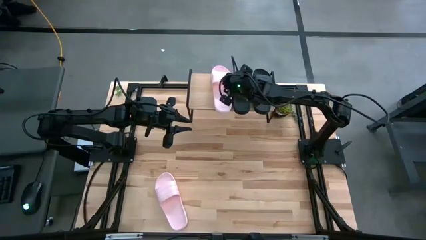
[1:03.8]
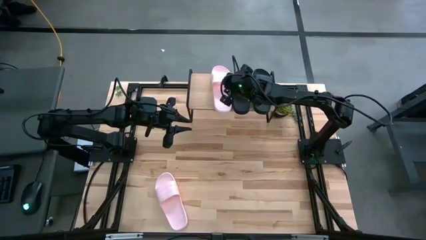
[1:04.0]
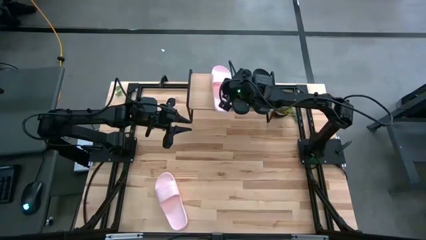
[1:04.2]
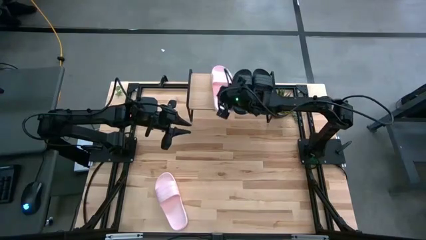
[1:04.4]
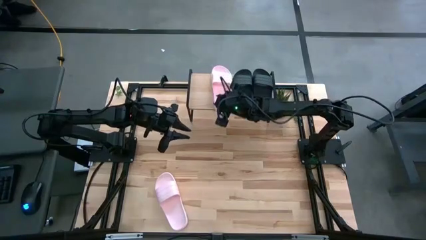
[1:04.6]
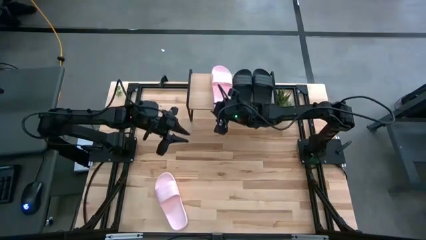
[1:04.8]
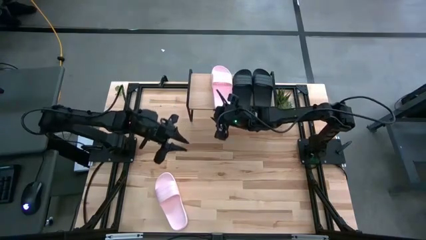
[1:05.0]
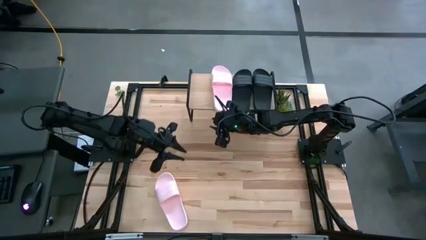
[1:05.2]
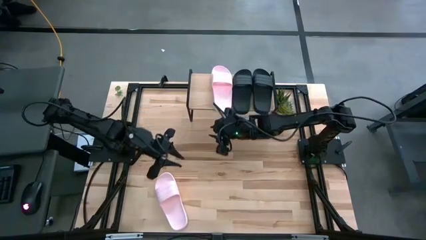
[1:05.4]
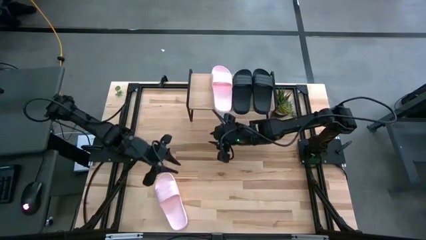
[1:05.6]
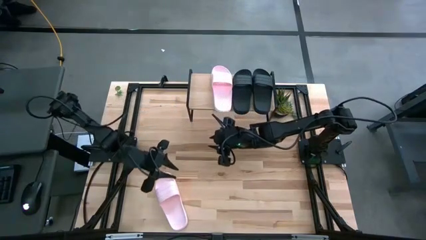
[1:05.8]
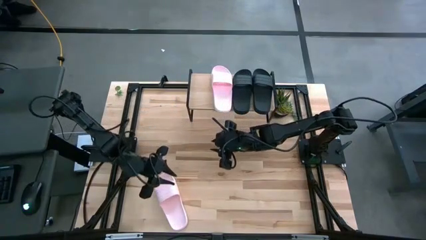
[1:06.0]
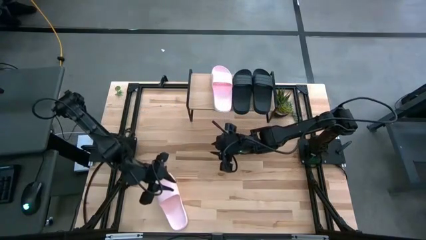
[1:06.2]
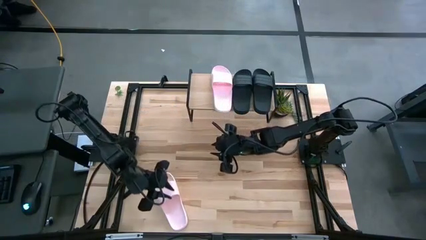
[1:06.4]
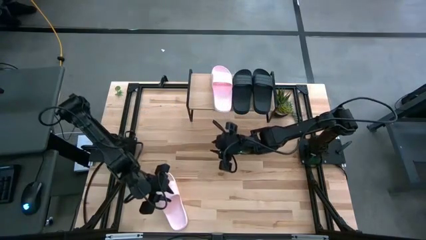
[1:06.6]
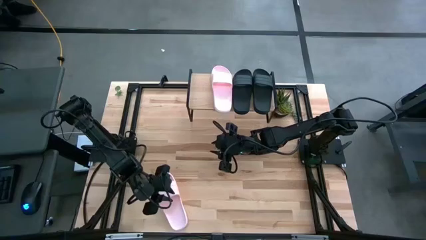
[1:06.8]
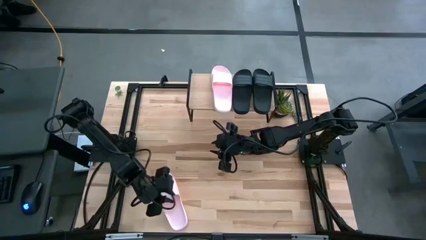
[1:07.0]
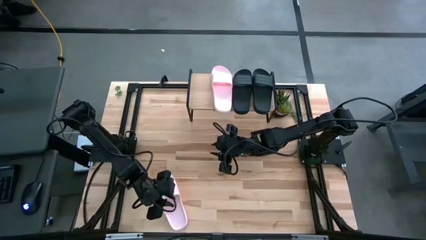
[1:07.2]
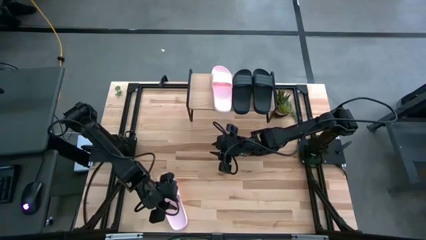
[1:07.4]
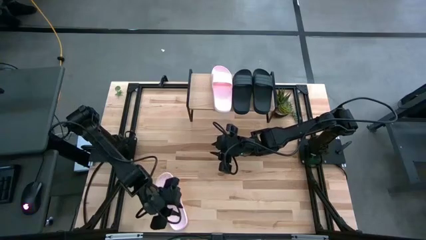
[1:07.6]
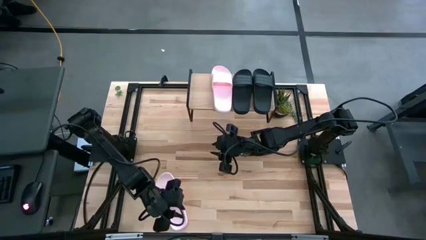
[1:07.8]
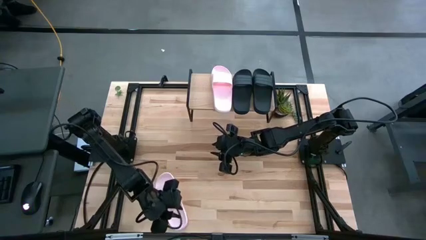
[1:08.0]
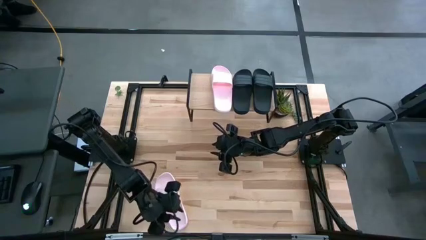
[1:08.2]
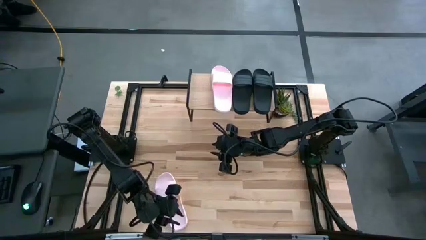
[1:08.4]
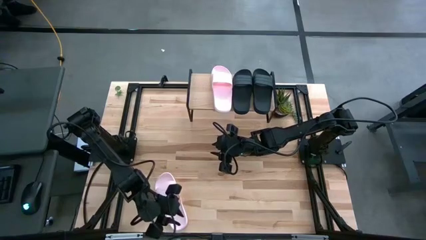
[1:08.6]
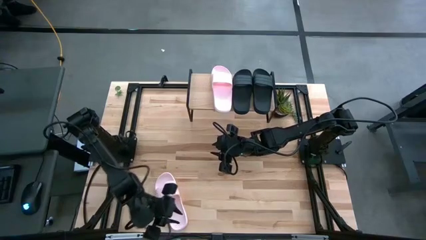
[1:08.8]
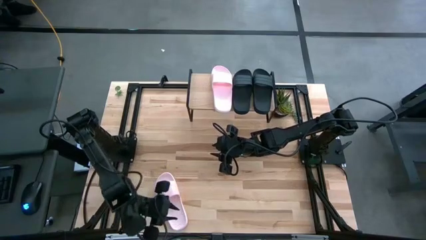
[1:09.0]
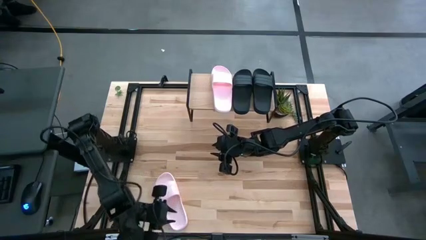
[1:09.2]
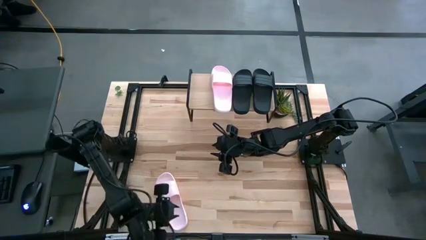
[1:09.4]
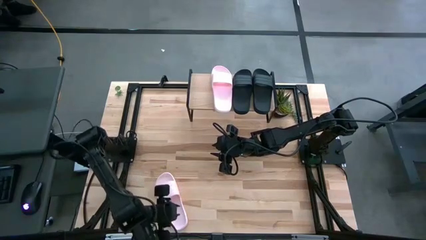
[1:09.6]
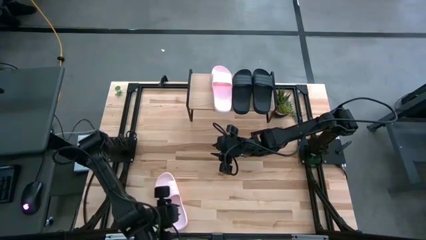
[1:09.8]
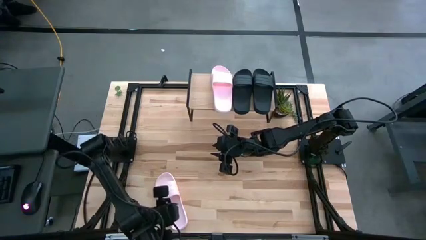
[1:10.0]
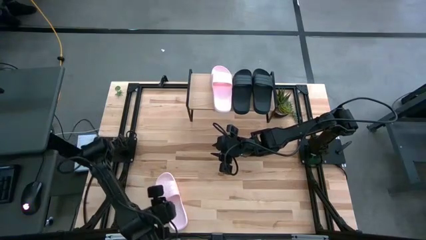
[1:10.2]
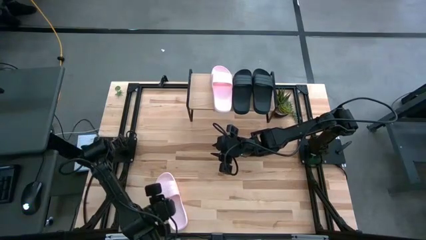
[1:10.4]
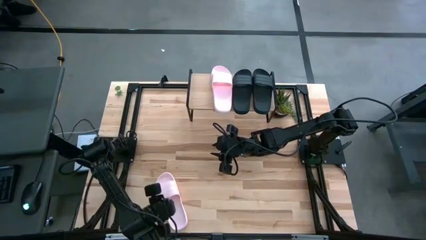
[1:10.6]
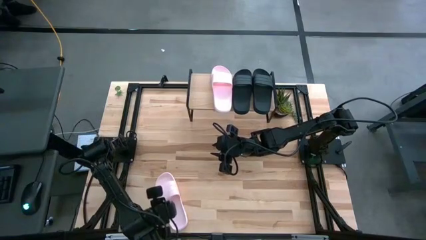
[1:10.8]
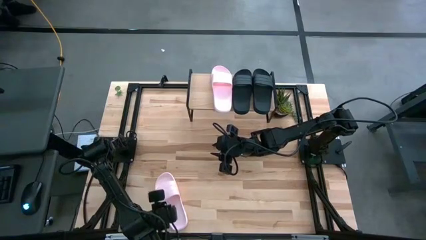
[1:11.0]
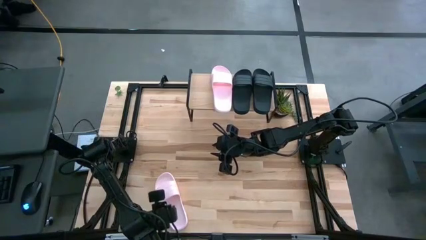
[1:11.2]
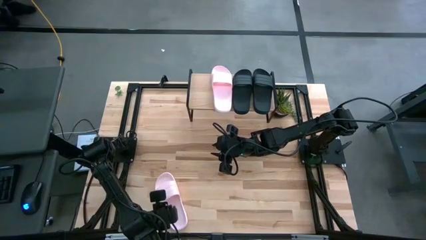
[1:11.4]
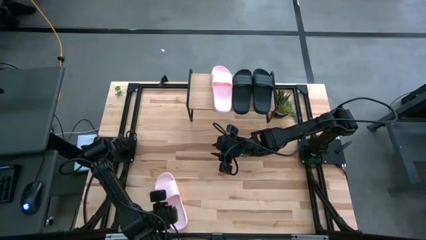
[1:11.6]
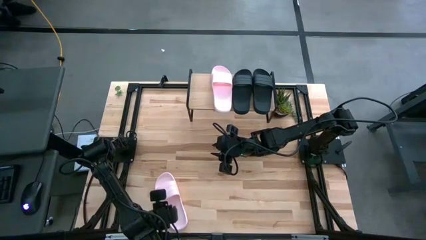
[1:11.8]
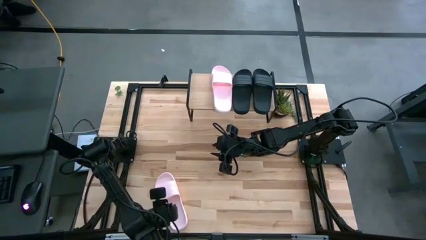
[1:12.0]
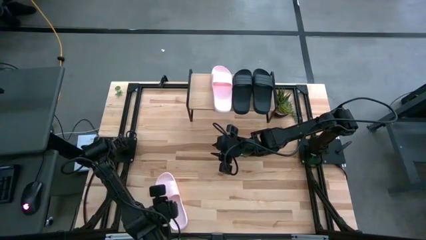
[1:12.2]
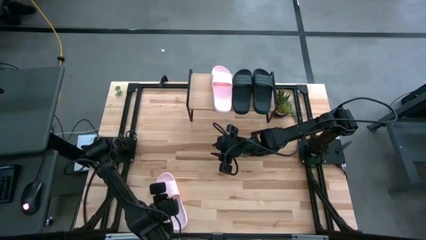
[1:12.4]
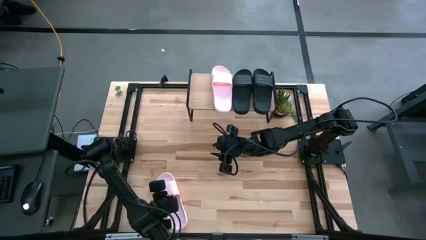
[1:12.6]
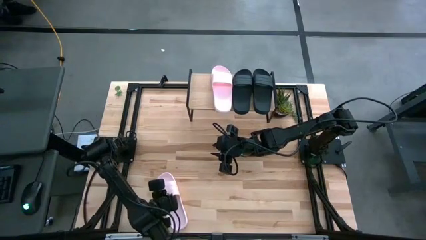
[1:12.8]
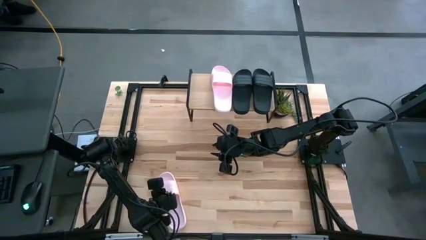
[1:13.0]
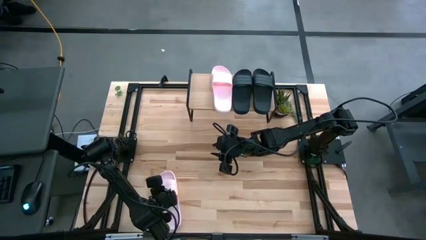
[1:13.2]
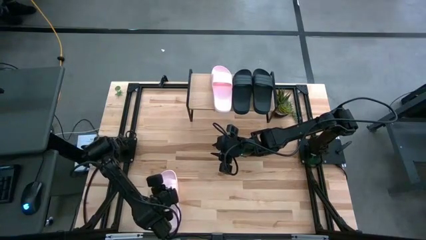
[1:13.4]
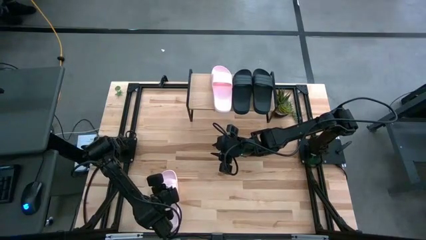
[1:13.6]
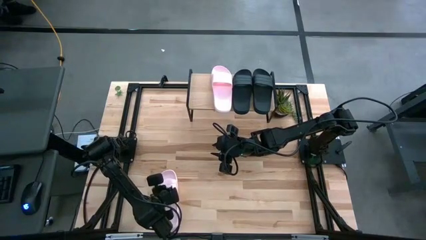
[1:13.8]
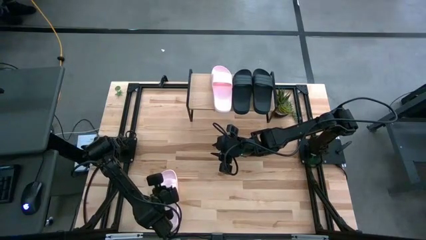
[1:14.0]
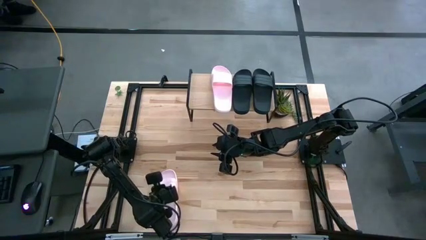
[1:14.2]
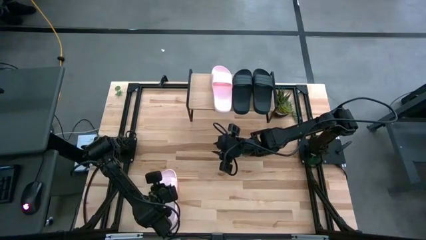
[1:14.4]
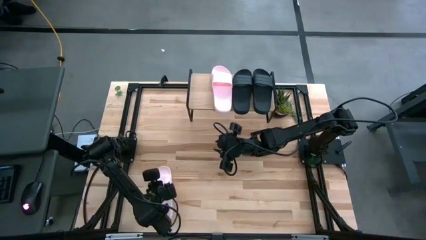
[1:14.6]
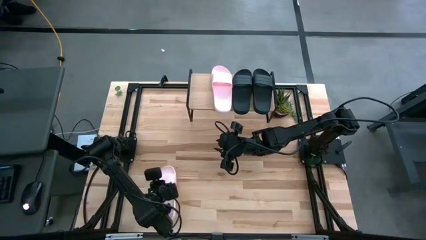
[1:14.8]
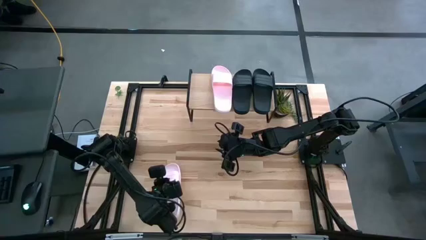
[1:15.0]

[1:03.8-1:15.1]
Task: Pick and place slides into the shelf
Put the pink slipper on the shelf
